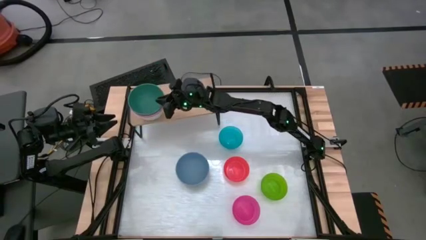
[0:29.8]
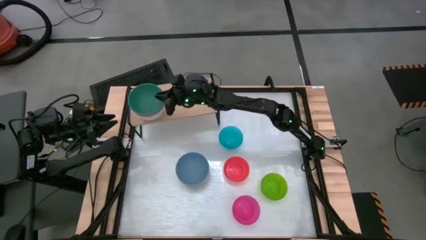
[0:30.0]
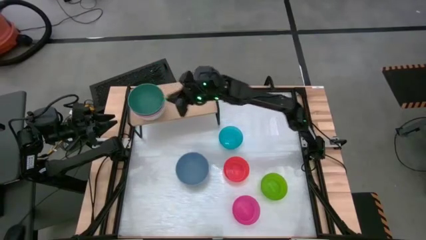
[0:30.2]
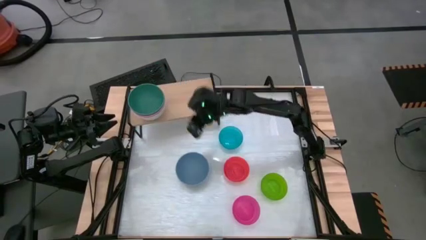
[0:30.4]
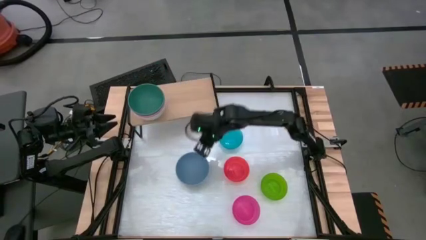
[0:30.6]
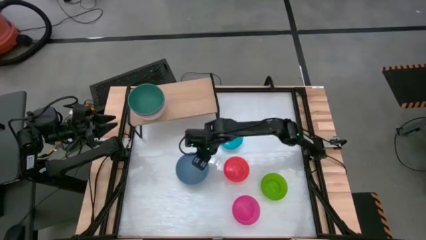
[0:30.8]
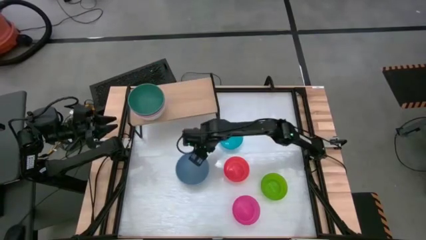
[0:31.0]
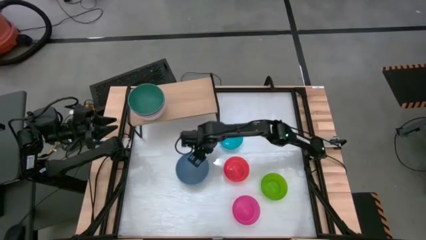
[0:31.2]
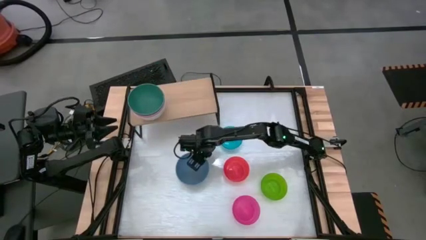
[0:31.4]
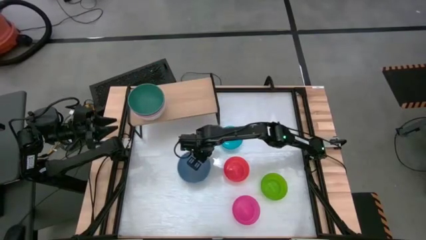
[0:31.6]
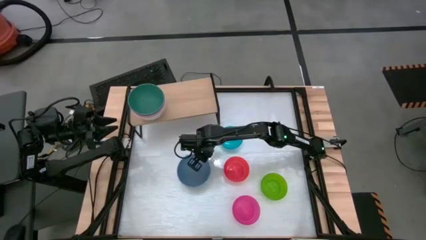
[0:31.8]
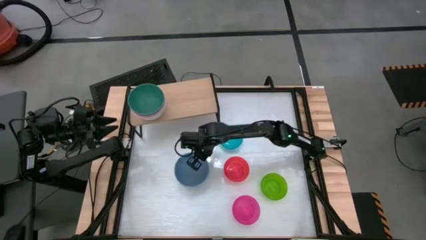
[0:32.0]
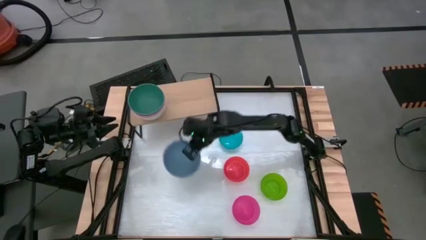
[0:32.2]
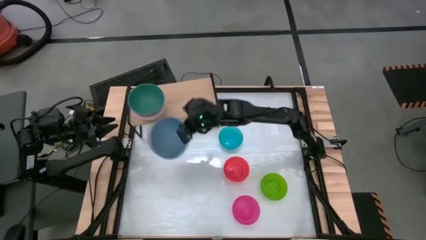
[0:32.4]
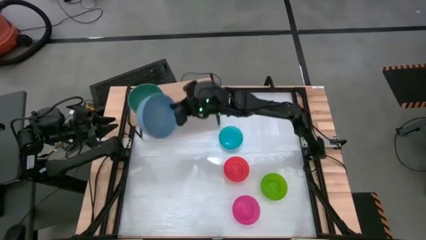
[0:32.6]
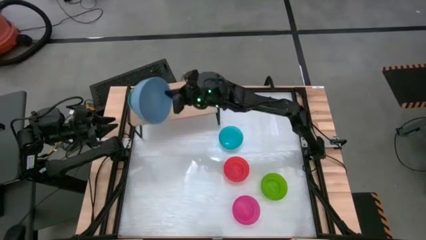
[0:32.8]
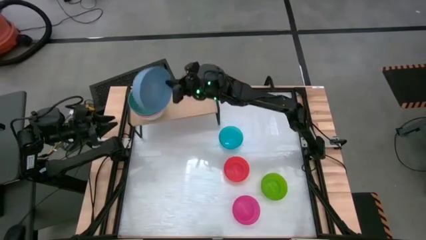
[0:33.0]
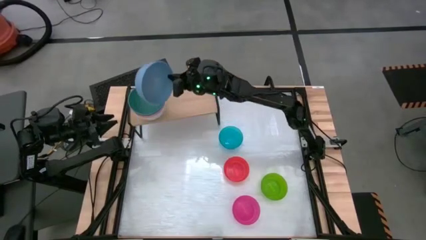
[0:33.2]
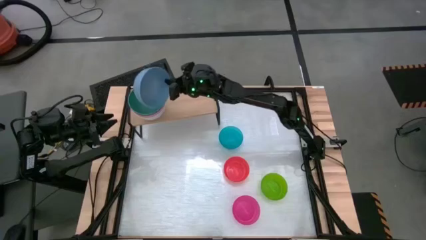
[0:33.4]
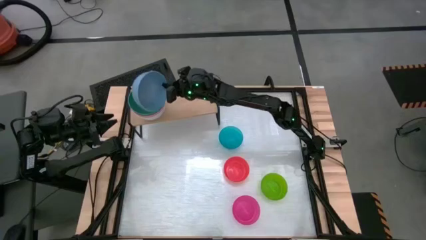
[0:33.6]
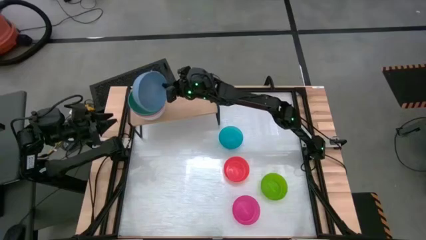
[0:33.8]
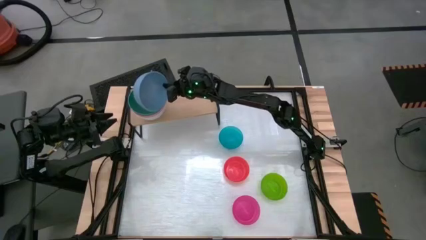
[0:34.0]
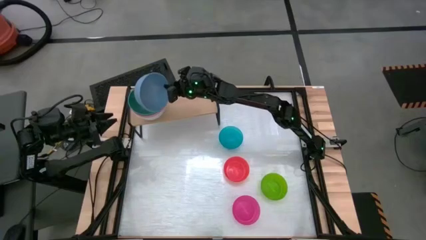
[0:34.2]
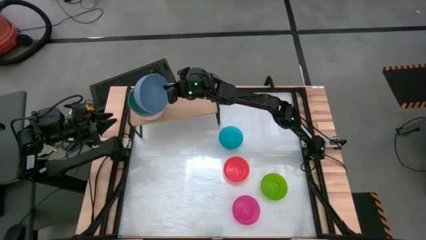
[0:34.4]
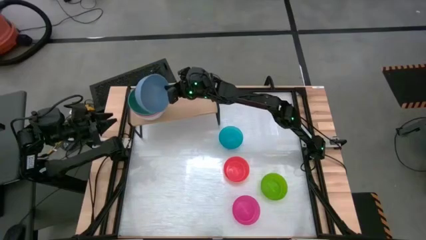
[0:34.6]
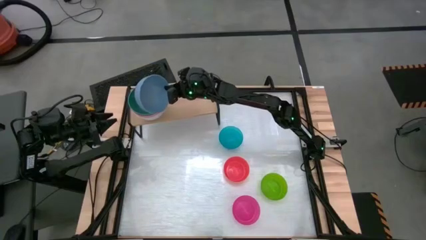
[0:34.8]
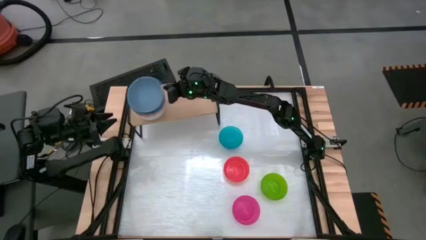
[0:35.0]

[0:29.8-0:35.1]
Task: Place and stack bowls onto a shelf
Stack the big blue bowl on top of the big dark green bowl on the shelf

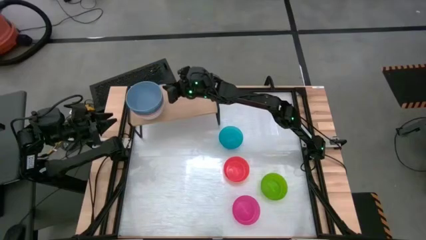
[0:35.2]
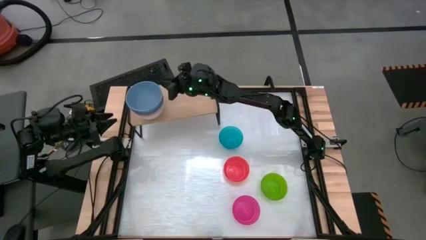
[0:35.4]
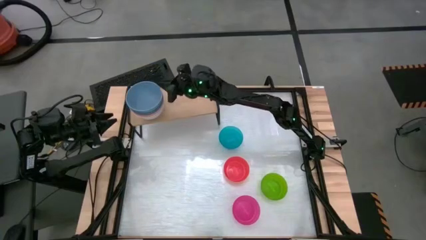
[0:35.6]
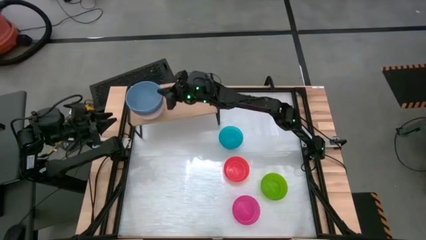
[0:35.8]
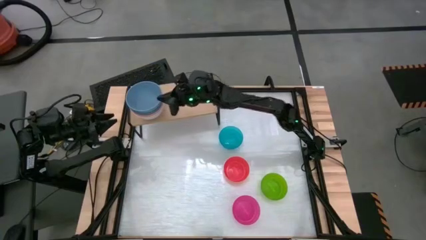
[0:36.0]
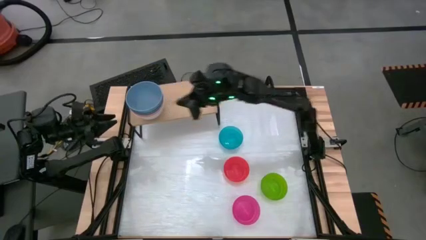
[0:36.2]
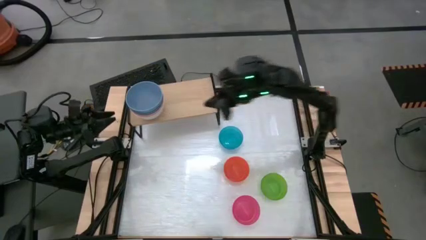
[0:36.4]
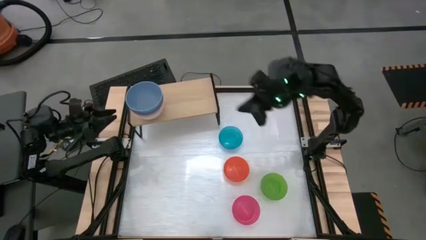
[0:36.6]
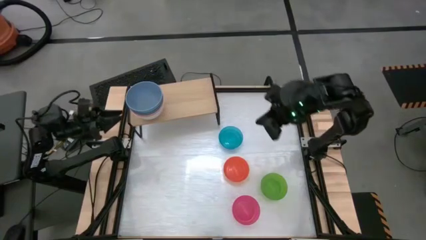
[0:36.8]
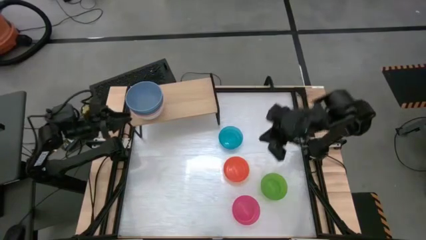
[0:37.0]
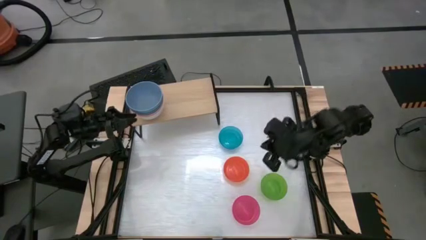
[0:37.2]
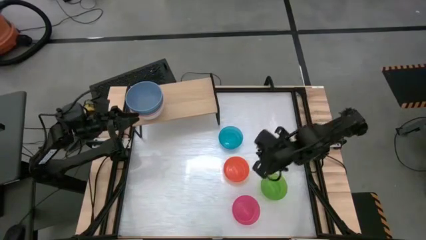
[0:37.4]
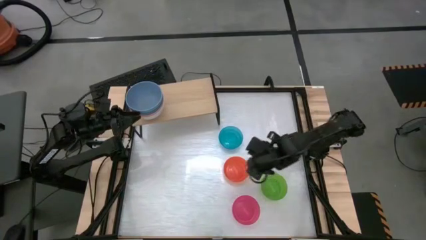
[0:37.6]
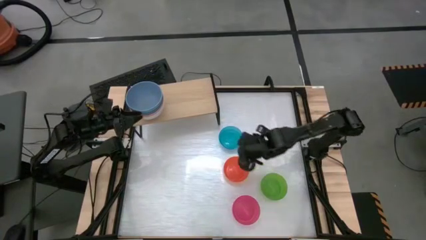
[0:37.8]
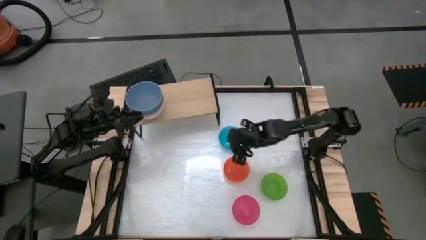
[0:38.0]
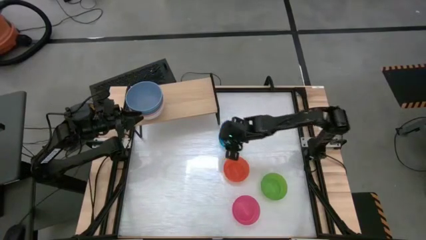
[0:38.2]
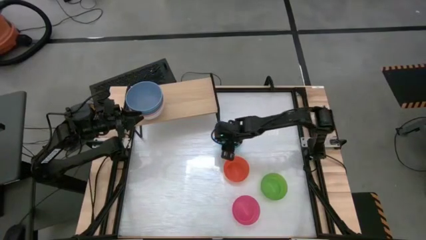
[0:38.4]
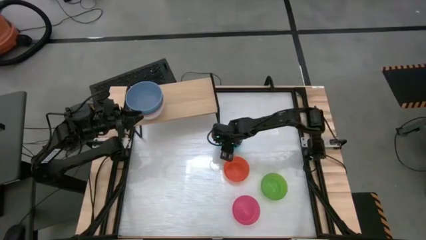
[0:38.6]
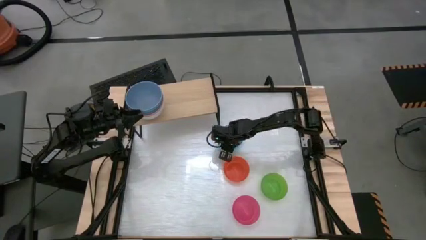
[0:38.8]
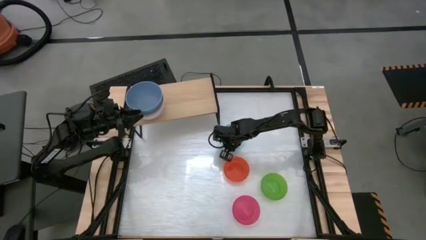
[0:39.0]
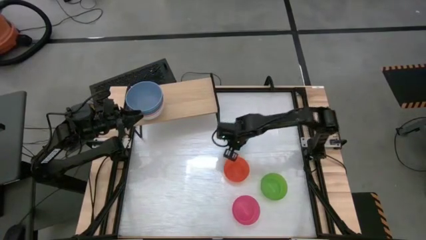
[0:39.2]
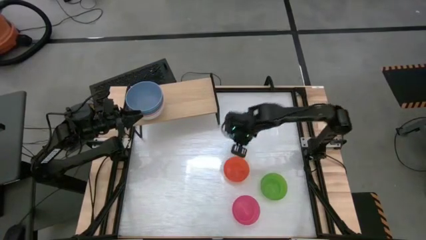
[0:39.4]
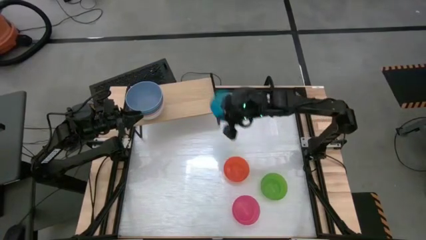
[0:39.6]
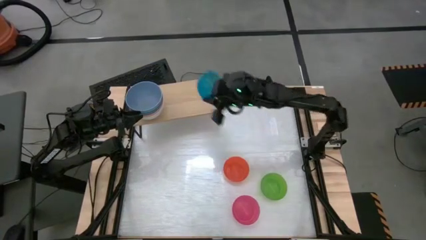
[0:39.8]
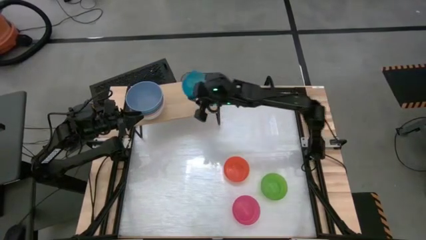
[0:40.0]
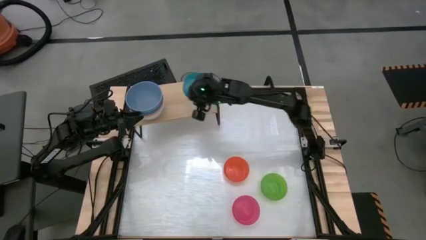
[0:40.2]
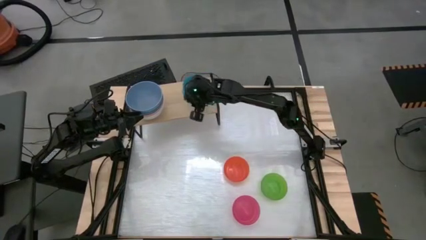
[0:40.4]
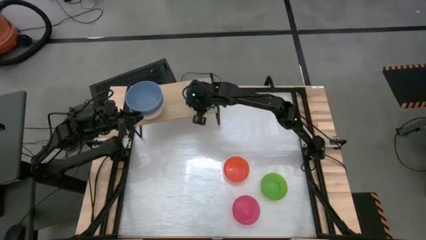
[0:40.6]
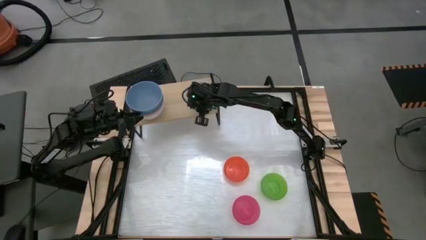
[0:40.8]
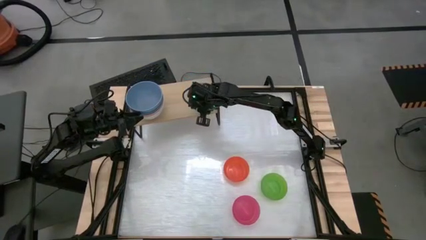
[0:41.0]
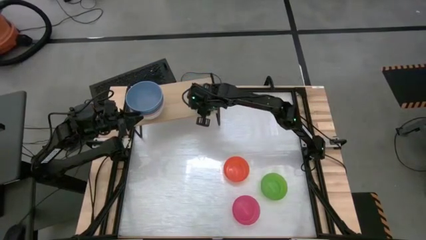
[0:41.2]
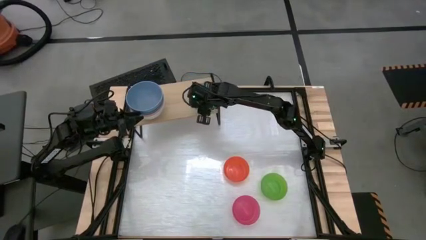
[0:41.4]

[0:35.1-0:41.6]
Put the small blue bowl on the shelf

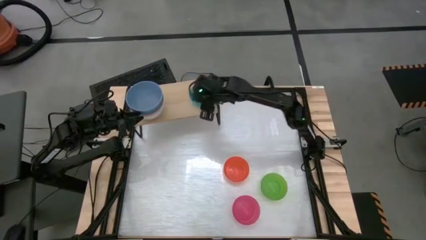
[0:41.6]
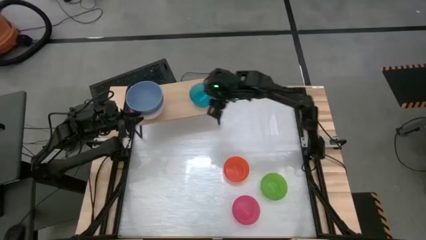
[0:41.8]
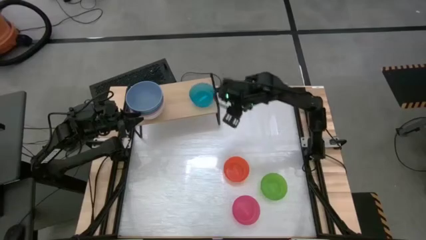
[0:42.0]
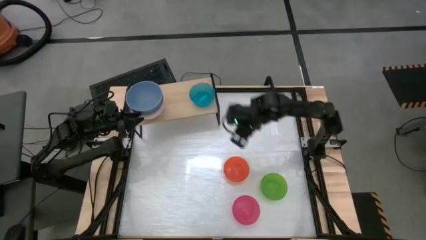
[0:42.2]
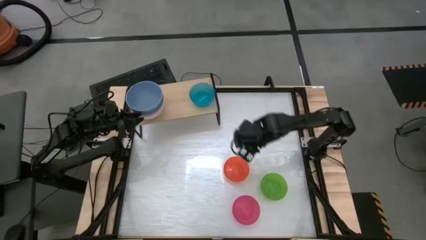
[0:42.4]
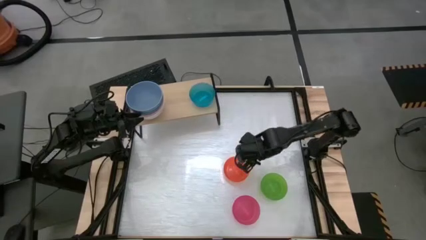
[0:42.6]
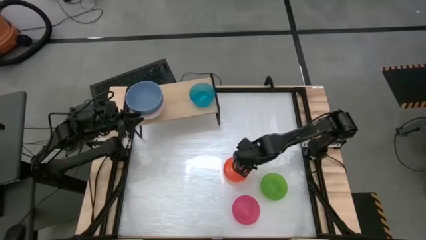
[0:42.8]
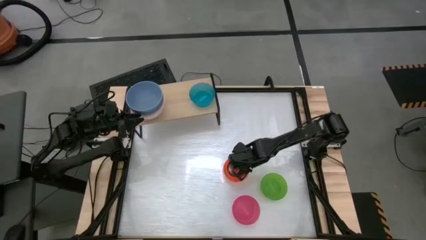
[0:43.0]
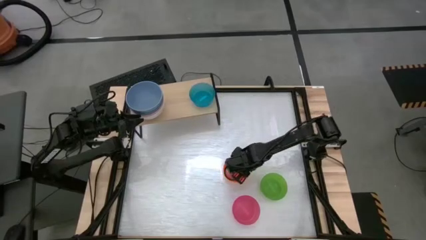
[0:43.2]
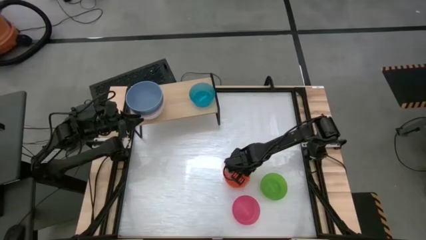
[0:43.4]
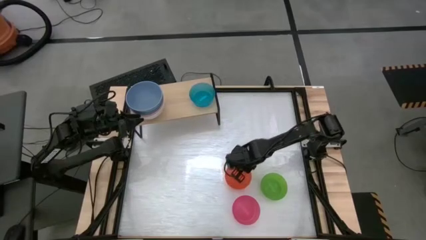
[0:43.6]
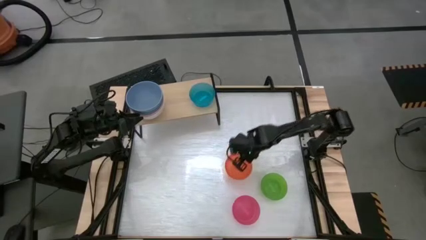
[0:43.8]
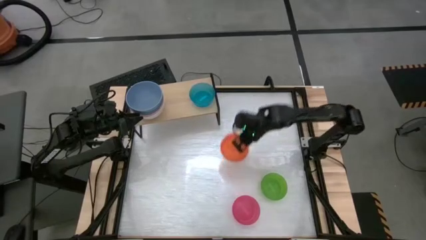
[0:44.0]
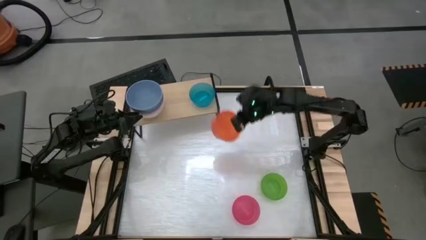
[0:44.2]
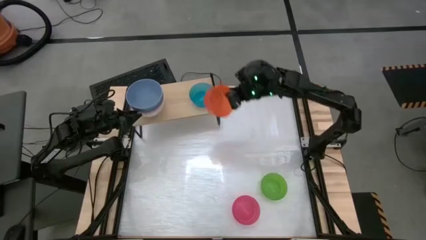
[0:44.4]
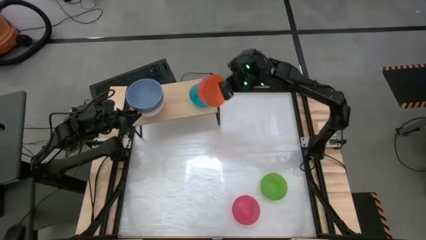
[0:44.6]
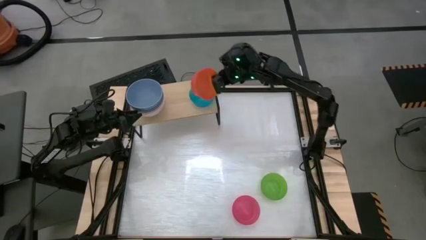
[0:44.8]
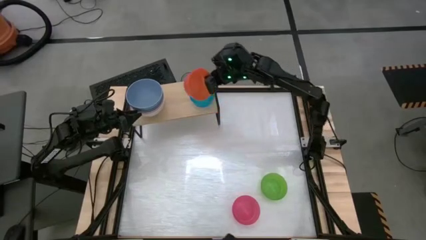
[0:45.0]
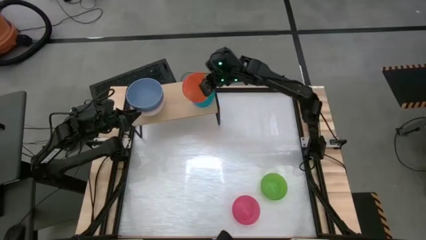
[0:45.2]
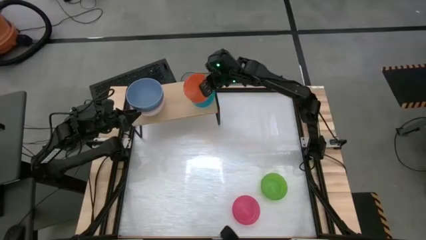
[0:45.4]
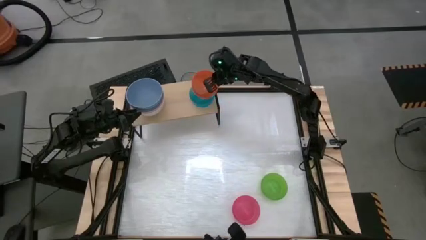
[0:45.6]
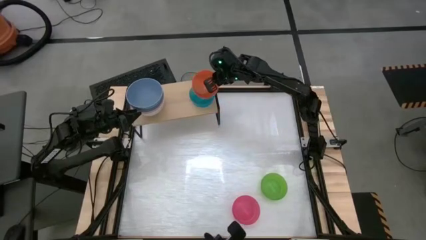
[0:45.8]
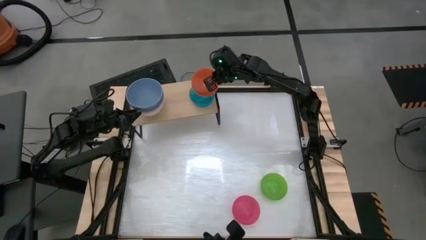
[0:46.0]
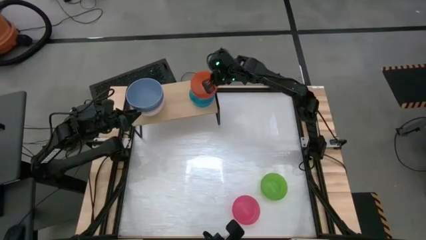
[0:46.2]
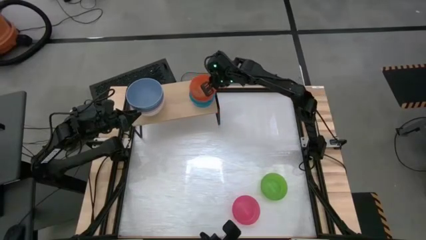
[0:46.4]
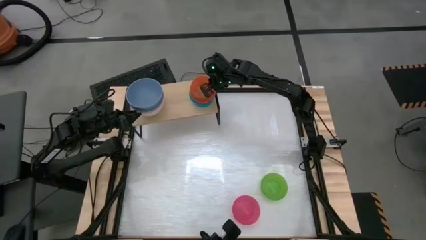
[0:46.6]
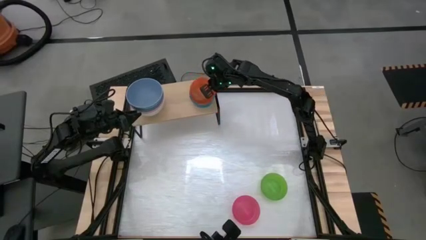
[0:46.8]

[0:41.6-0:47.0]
Stack the small orange bowl on top of the small light blue bowl on the shelf
